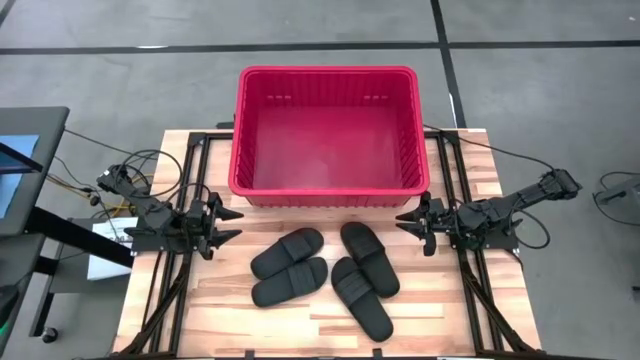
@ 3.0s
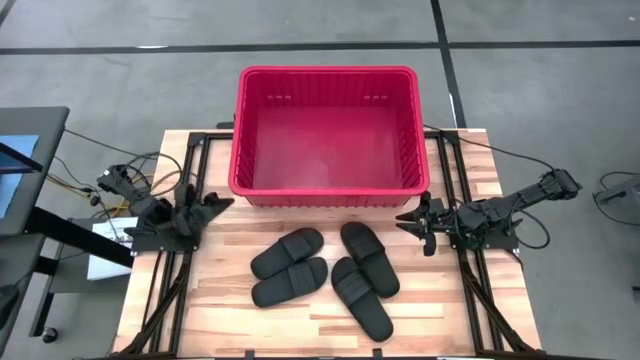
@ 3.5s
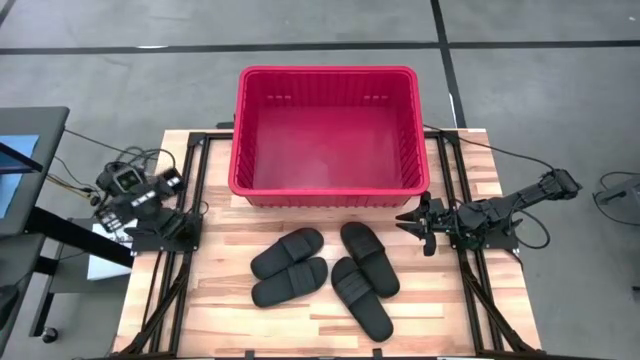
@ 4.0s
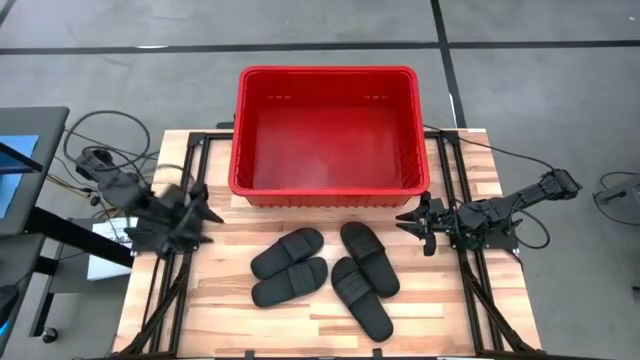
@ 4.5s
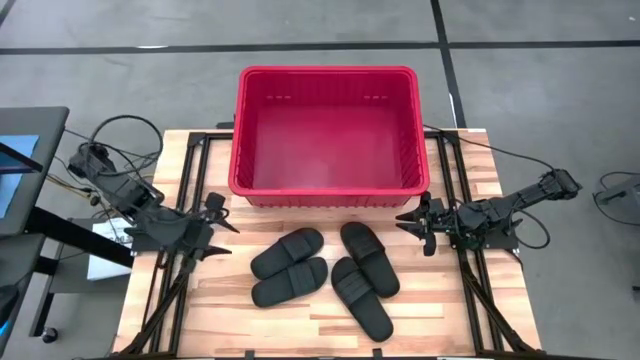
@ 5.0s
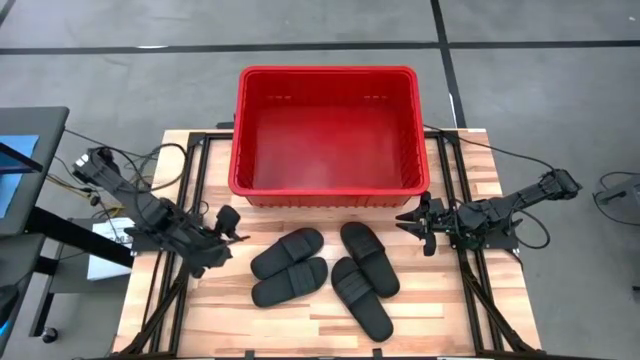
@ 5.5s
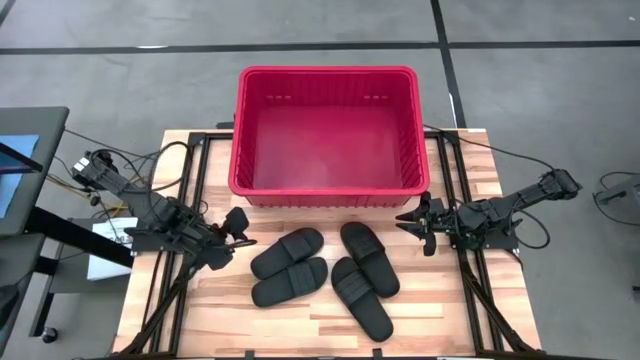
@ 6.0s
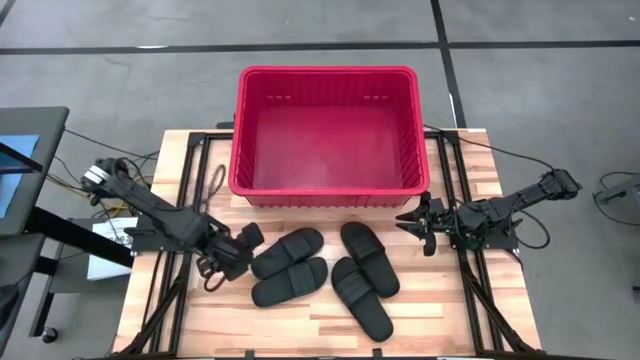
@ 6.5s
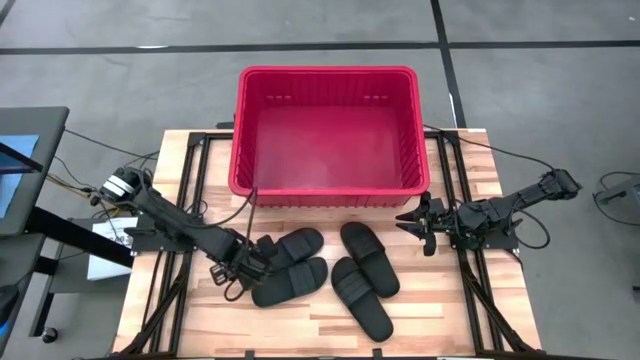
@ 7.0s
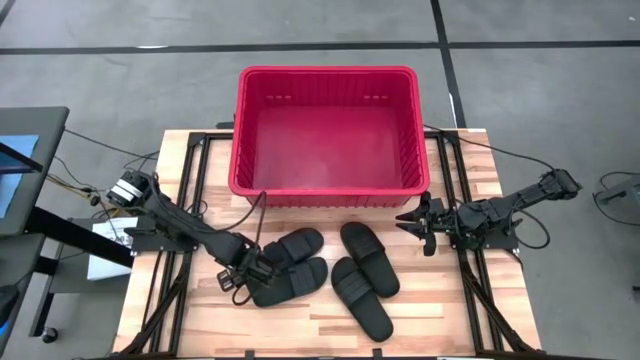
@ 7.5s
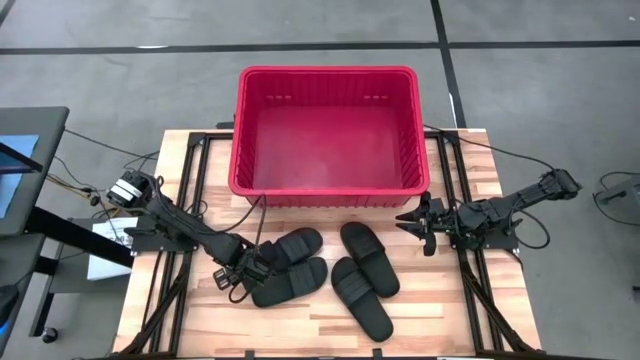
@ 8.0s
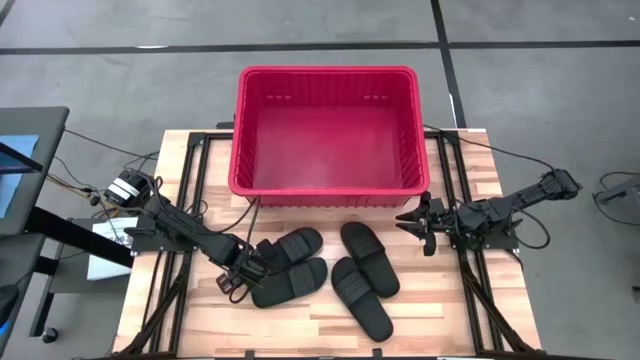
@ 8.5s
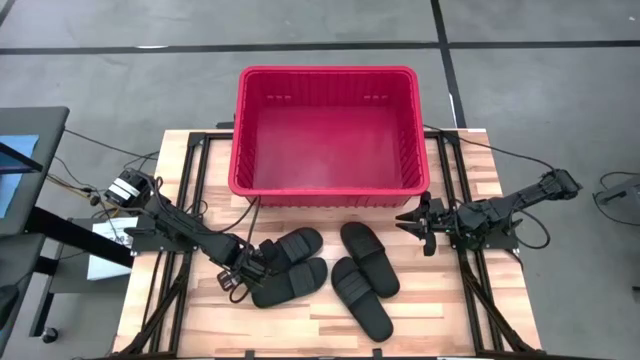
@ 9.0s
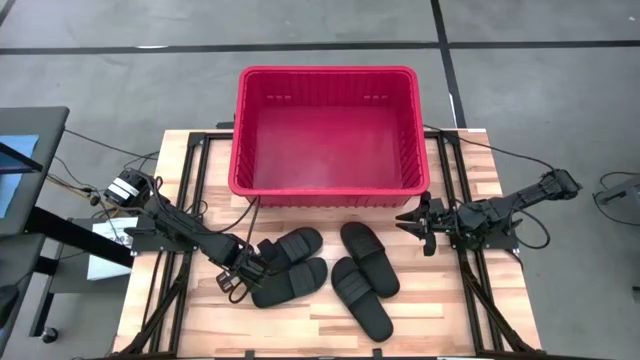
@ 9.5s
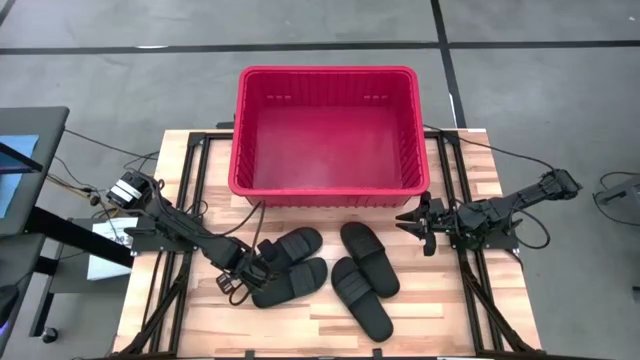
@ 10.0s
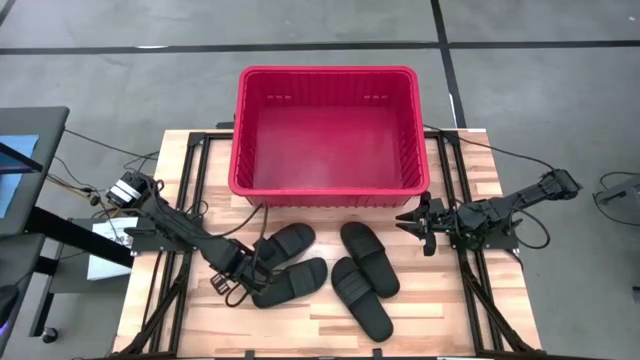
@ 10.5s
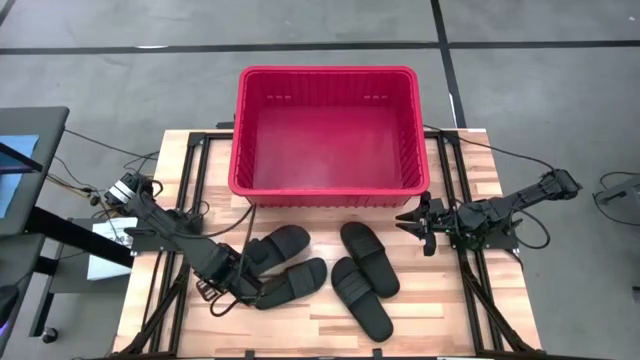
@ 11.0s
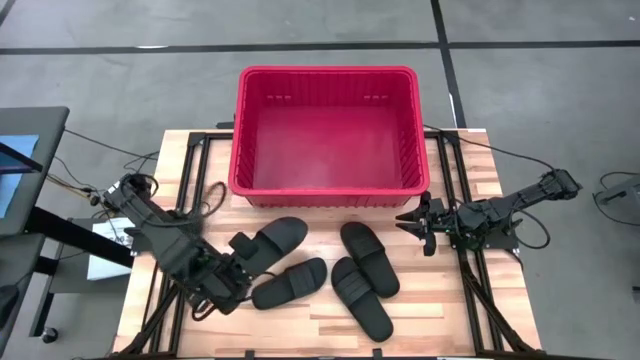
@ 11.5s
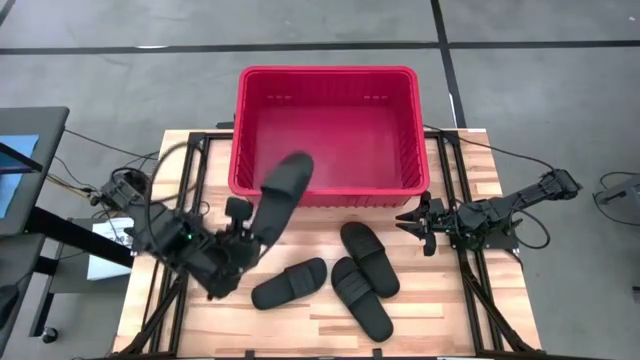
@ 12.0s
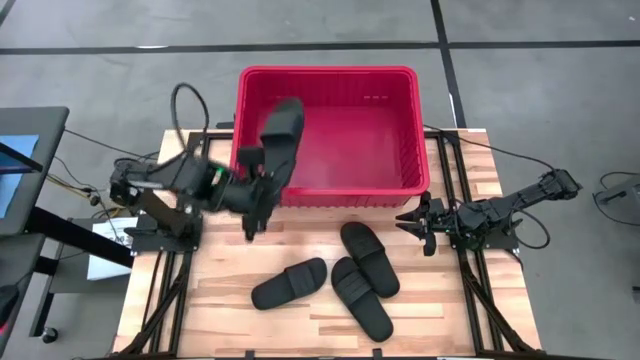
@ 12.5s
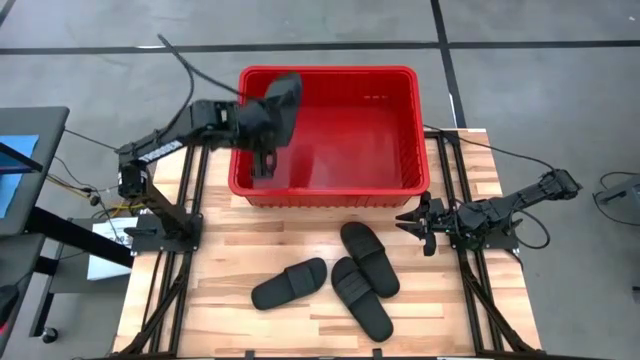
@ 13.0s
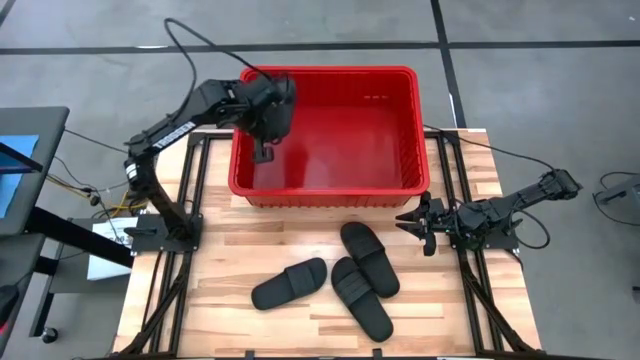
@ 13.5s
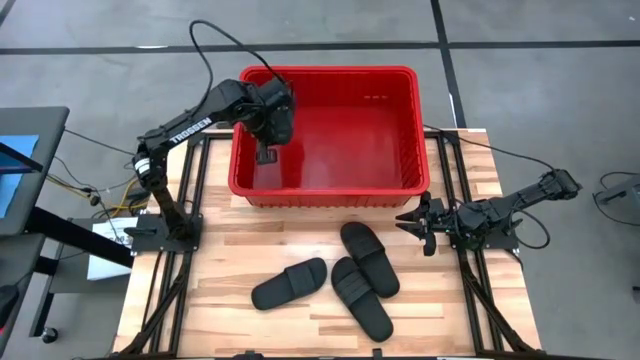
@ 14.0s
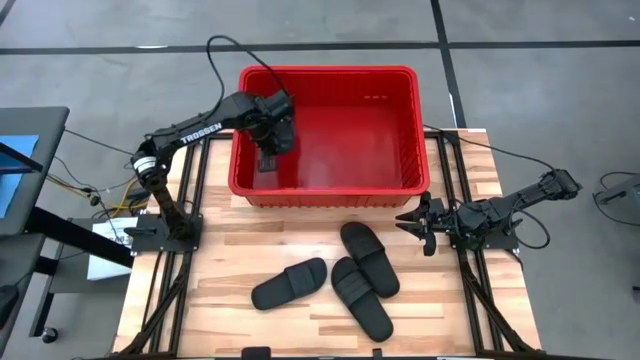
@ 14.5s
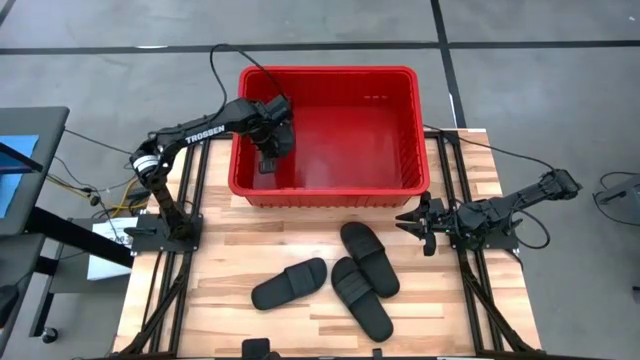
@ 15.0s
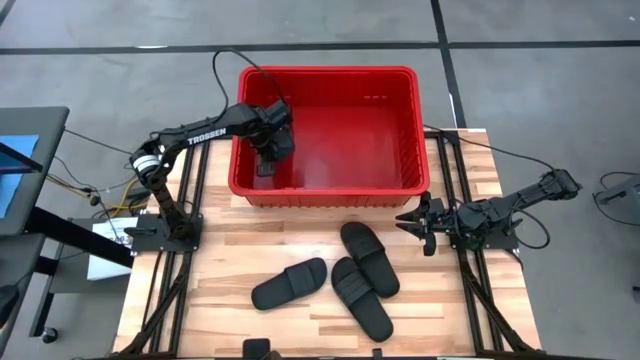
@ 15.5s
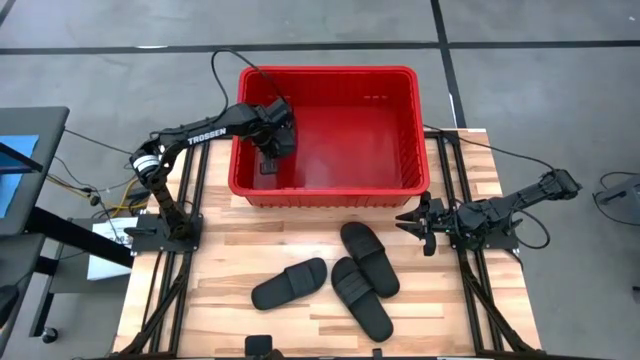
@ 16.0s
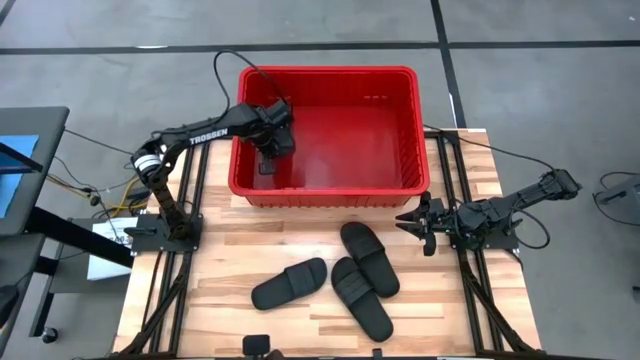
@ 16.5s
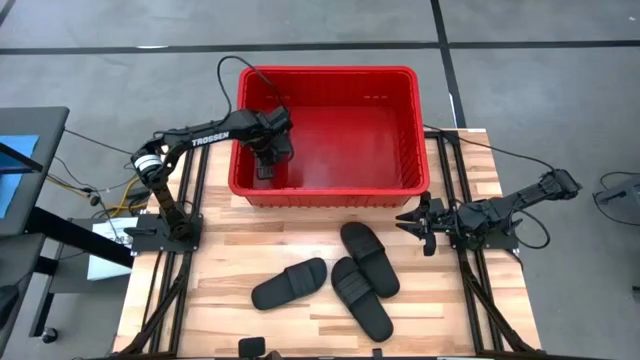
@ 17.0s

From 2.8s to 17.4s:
Task: Pick and place slides into bin
Put the black slide into the red organizer bin

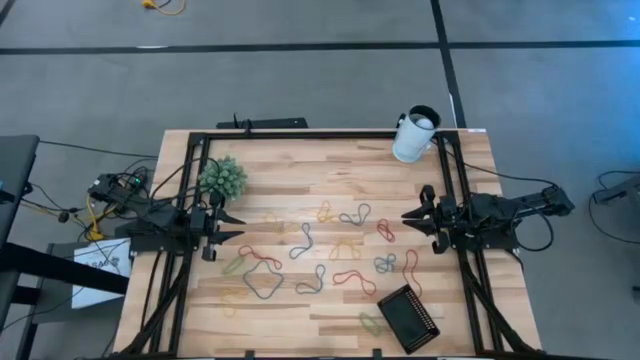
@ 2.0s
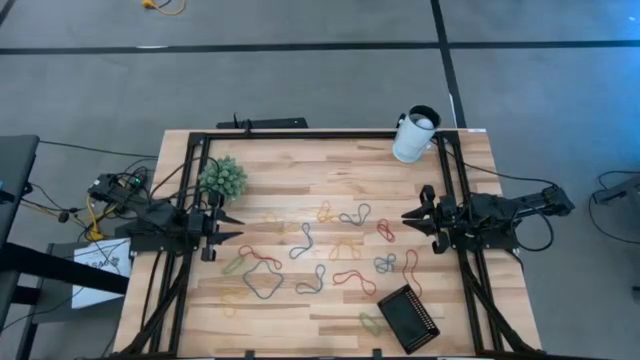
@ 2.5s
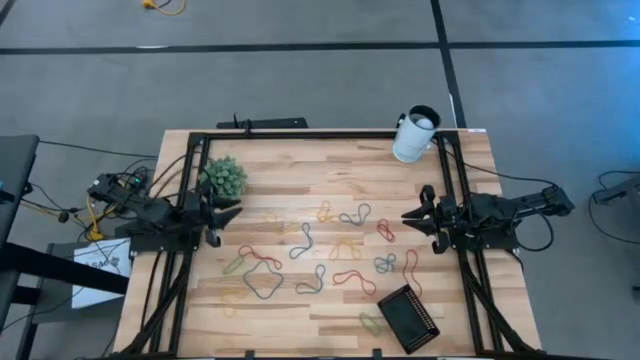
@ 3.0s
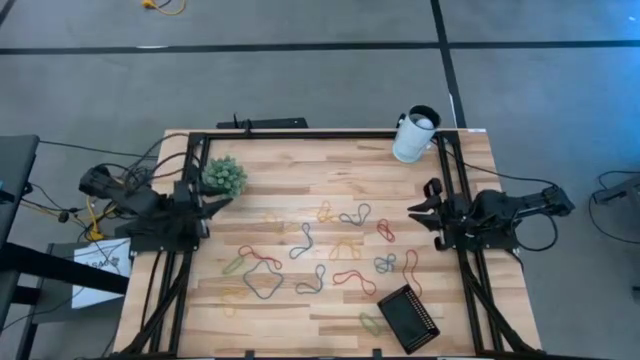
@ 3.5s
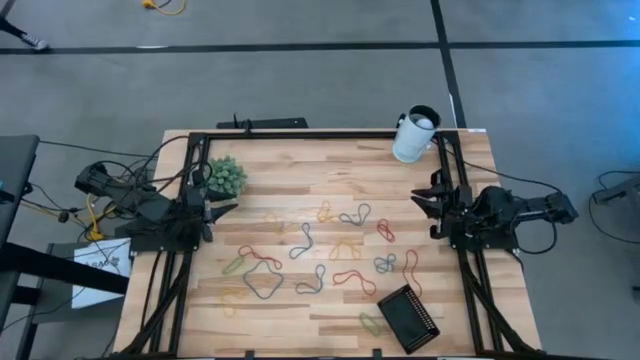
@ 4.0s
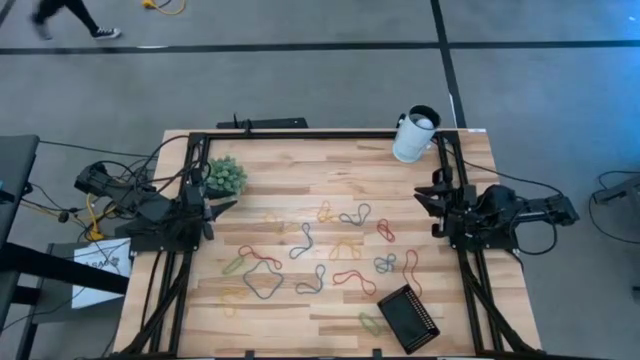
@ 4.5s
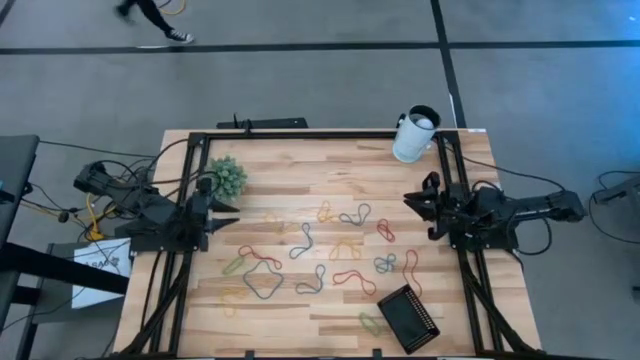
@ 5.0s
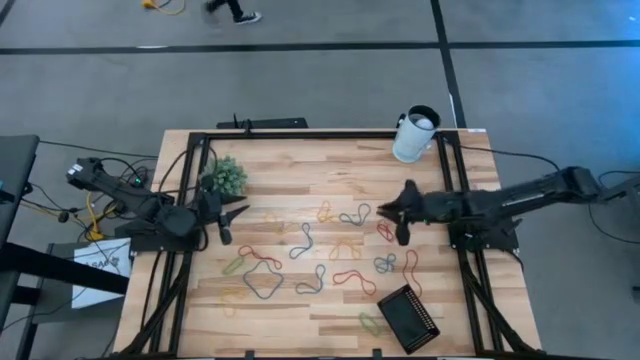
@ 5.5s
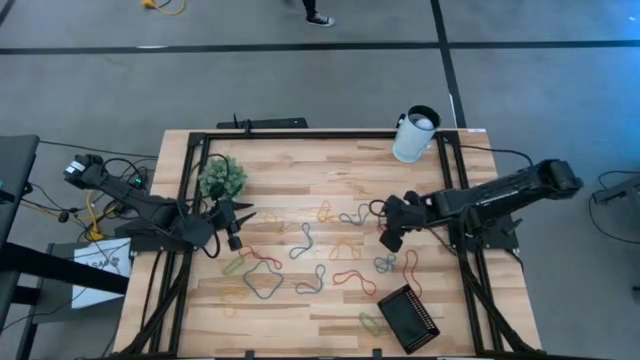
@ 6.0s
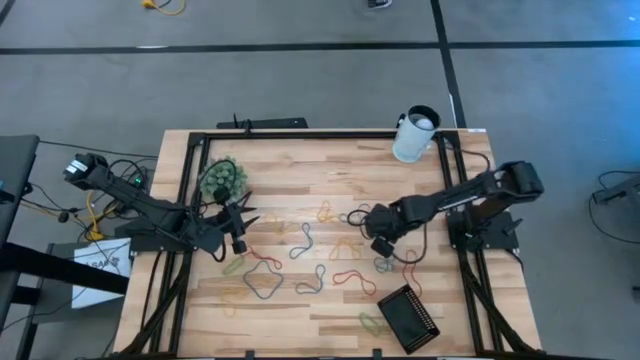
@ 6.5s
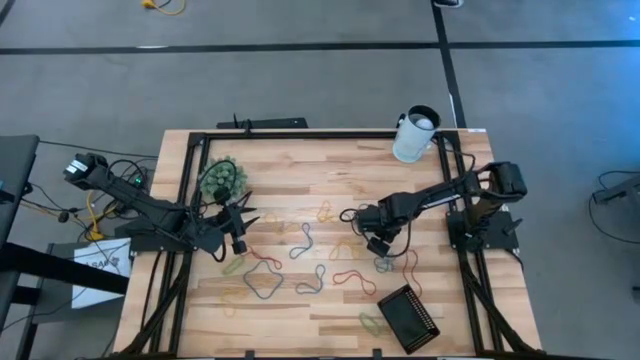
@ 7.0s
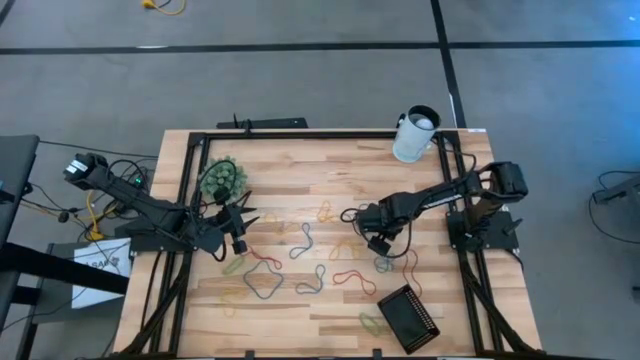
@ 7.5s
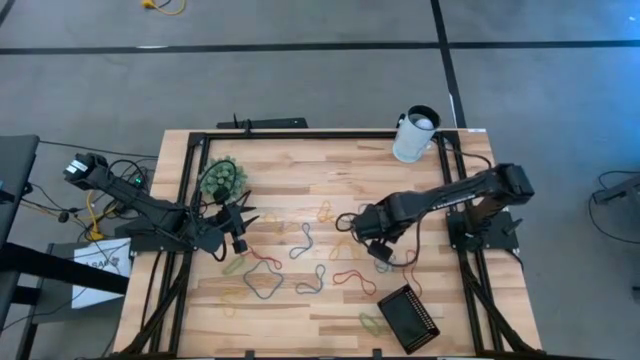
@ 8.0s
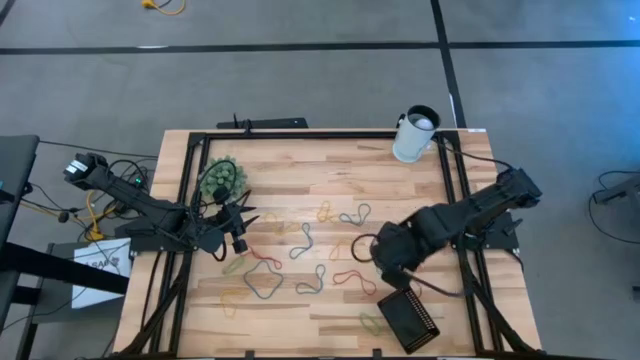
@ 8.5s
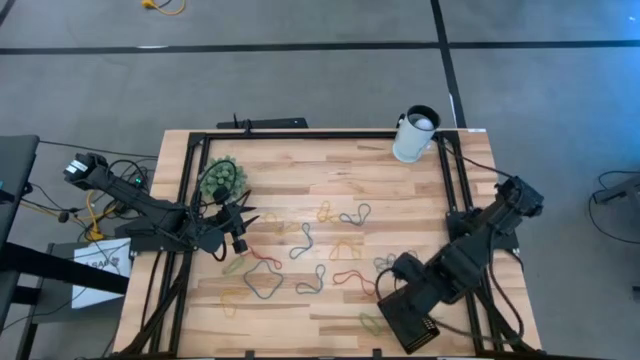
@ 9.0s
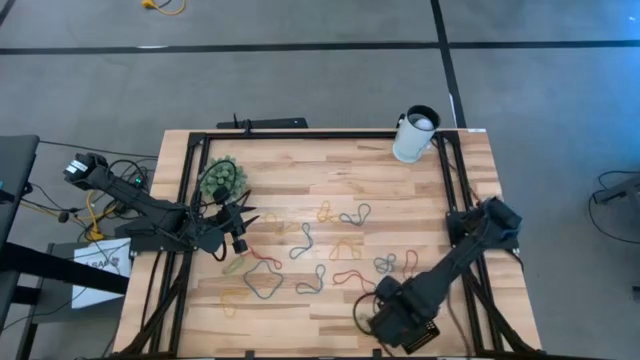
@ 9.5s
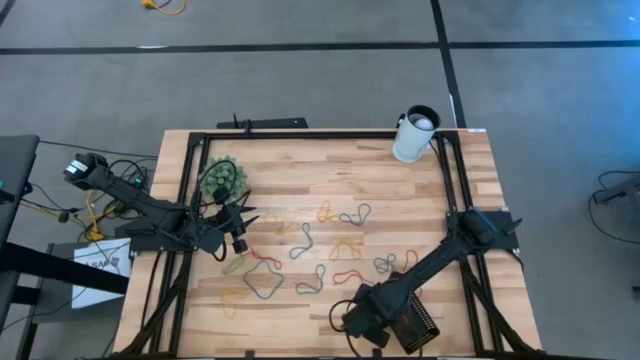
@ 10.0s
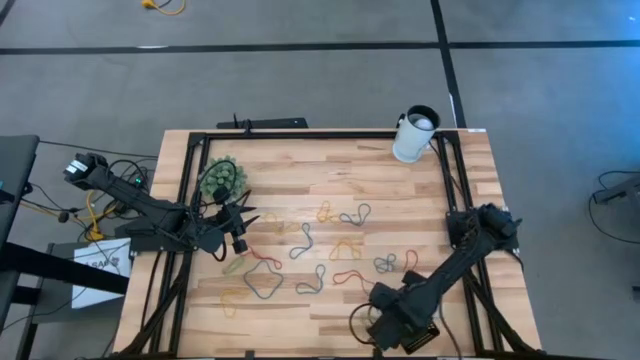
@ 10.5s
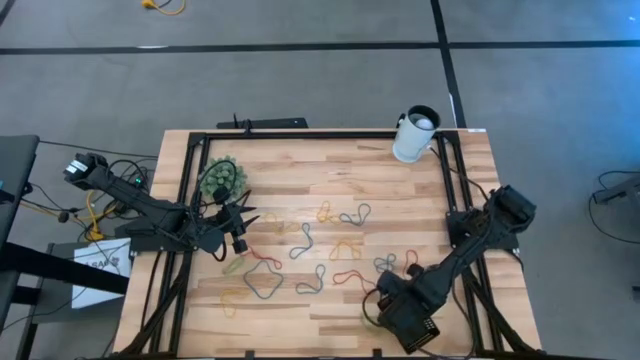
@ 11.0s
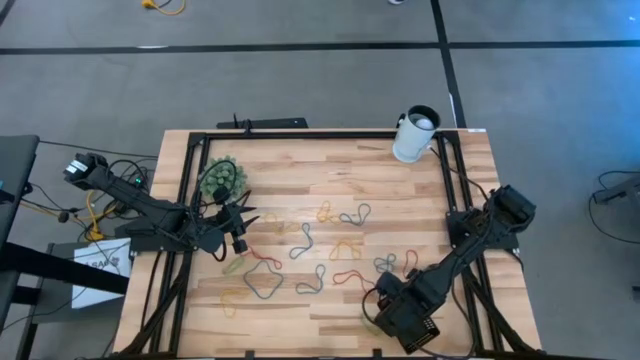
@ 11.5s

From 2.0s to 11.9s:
Task: Pick and place rubber bands into bin
Put the red rubber band into the black basket
